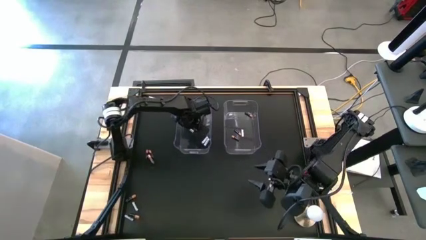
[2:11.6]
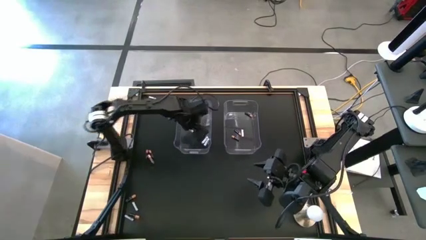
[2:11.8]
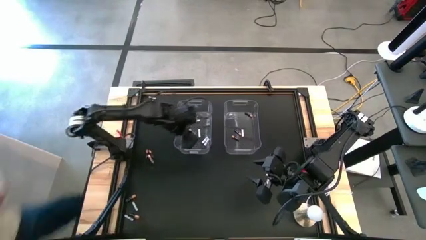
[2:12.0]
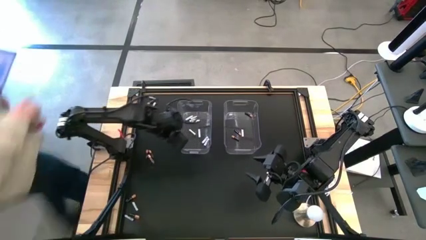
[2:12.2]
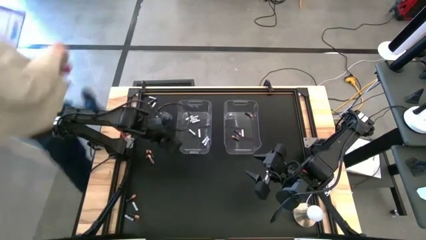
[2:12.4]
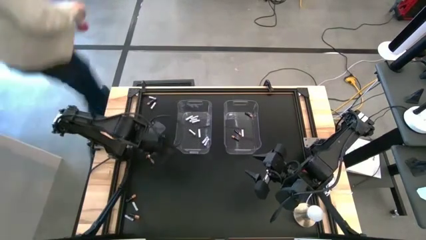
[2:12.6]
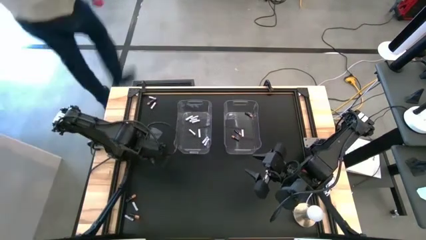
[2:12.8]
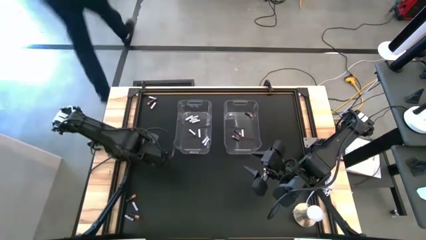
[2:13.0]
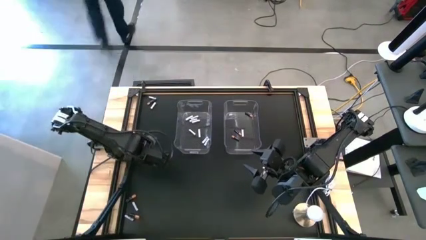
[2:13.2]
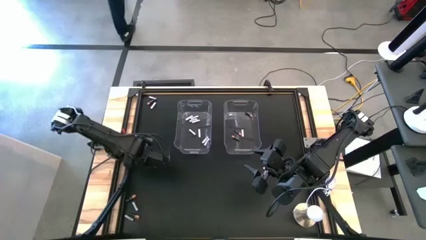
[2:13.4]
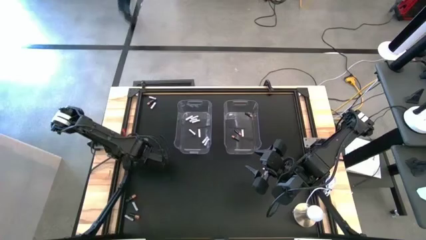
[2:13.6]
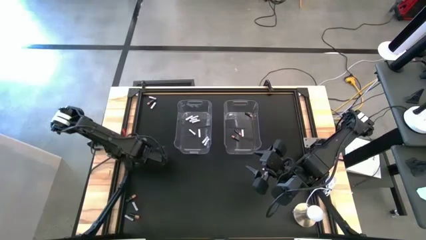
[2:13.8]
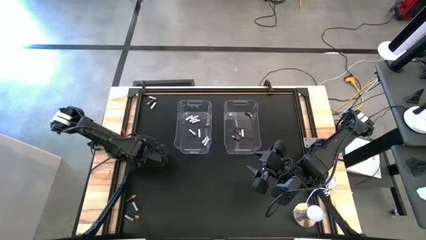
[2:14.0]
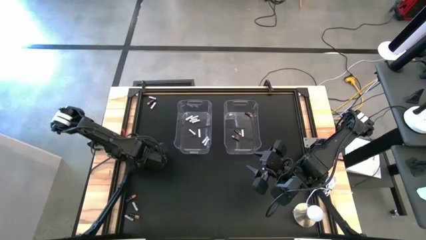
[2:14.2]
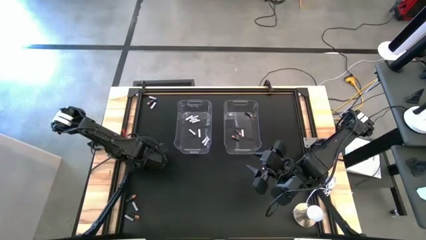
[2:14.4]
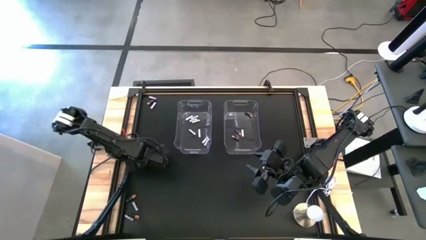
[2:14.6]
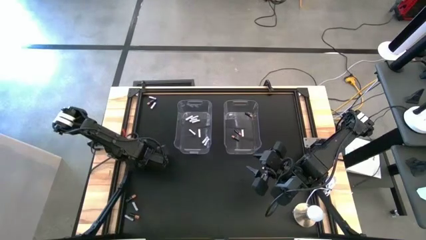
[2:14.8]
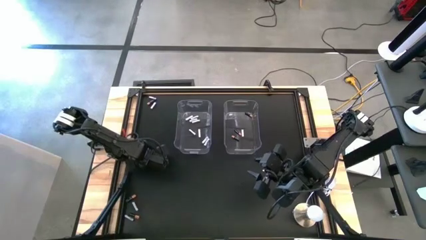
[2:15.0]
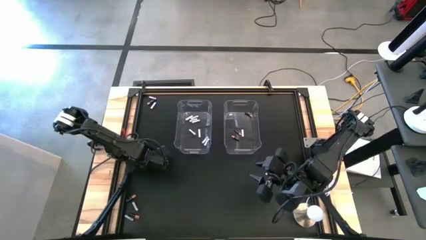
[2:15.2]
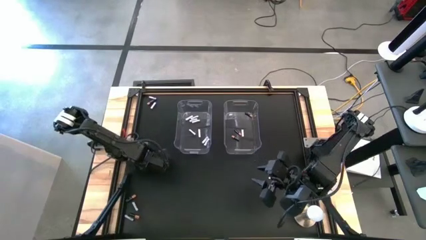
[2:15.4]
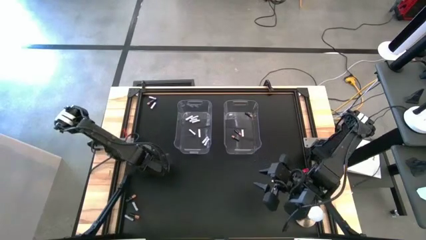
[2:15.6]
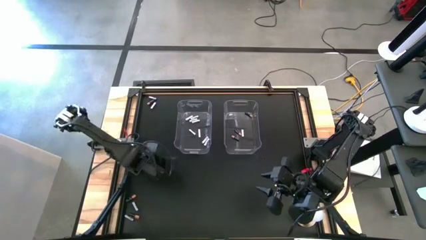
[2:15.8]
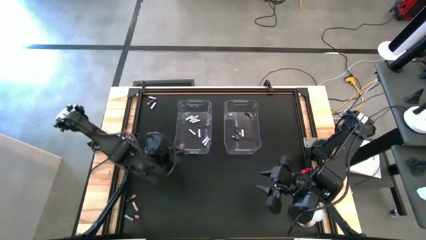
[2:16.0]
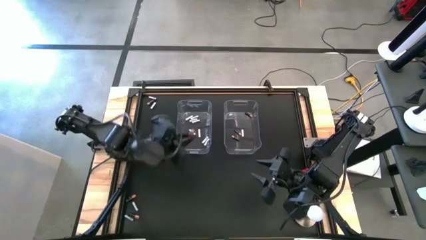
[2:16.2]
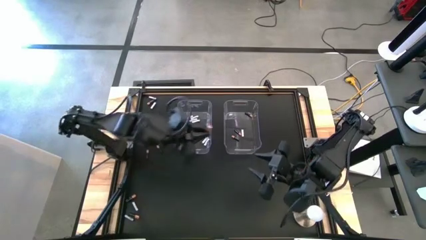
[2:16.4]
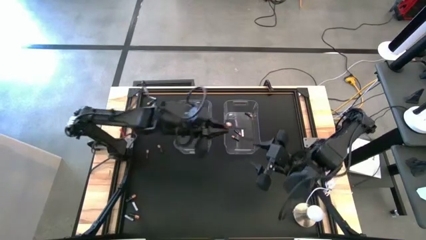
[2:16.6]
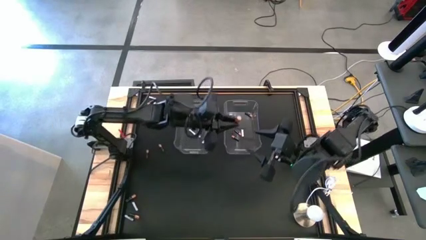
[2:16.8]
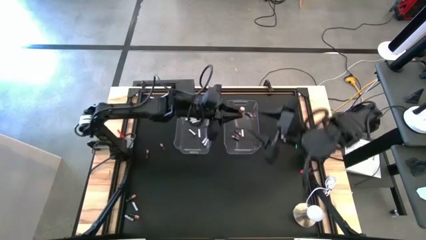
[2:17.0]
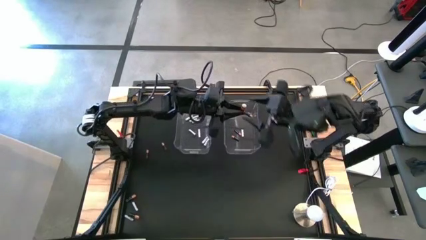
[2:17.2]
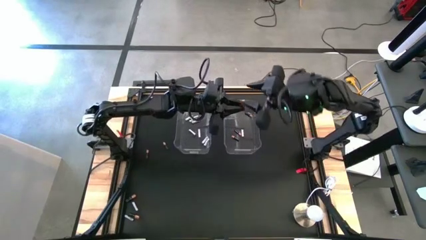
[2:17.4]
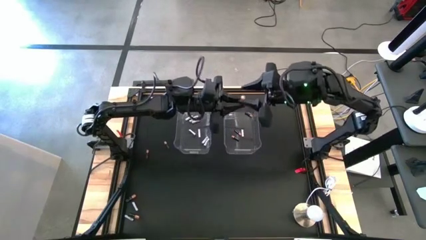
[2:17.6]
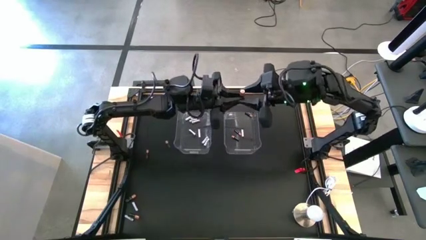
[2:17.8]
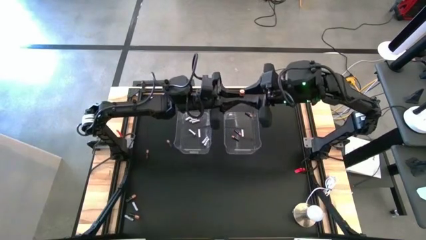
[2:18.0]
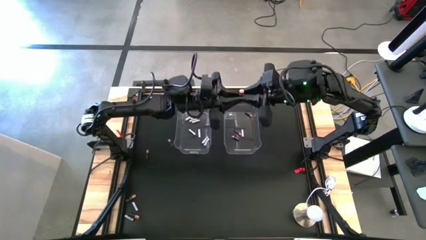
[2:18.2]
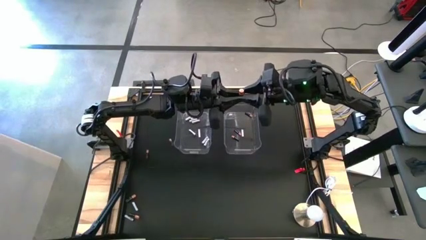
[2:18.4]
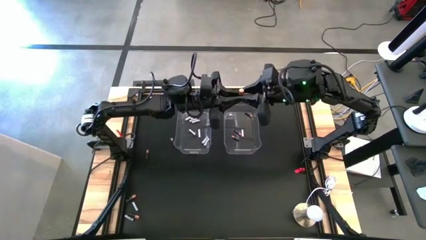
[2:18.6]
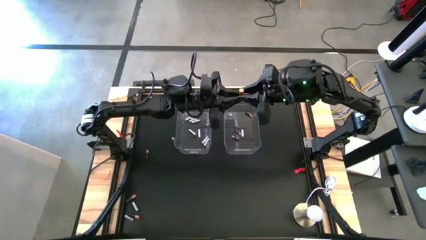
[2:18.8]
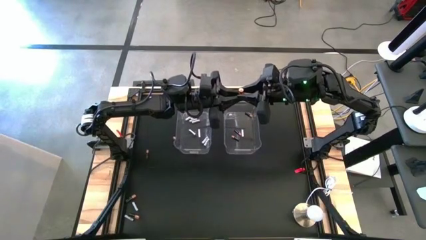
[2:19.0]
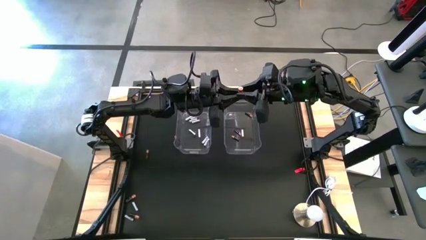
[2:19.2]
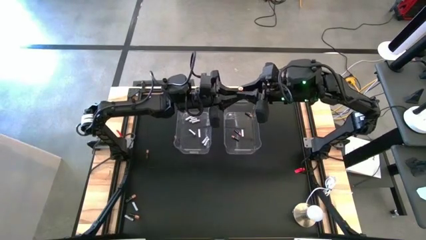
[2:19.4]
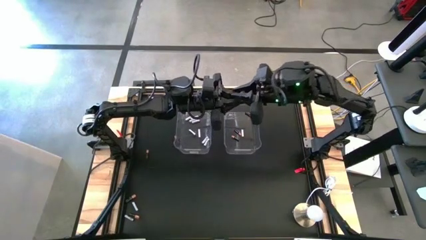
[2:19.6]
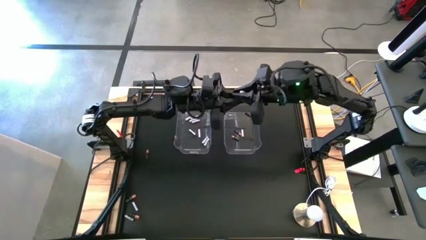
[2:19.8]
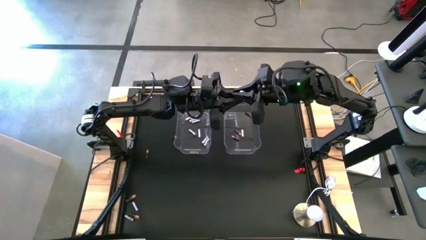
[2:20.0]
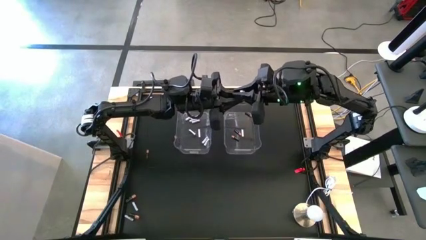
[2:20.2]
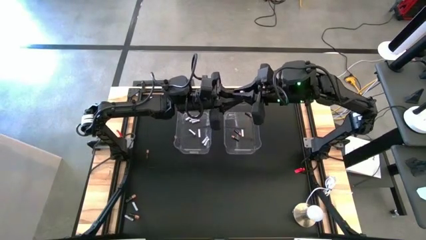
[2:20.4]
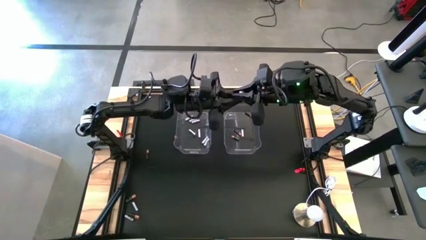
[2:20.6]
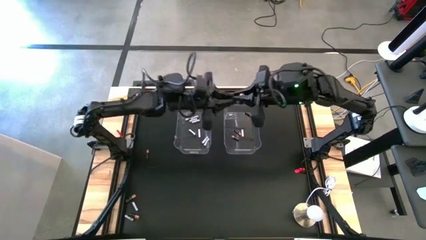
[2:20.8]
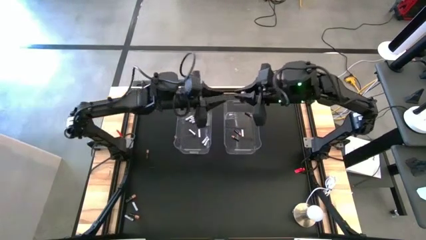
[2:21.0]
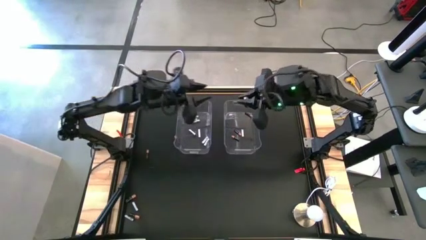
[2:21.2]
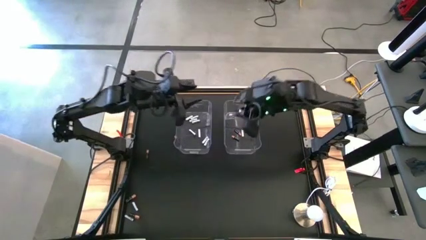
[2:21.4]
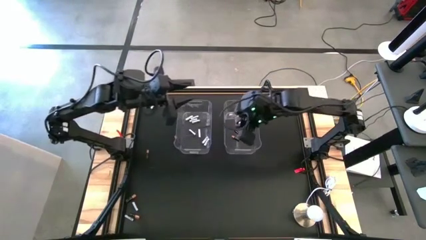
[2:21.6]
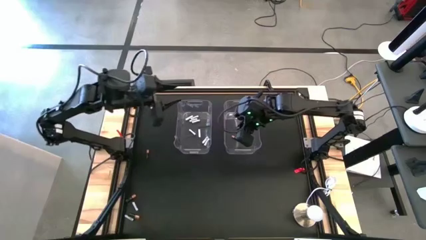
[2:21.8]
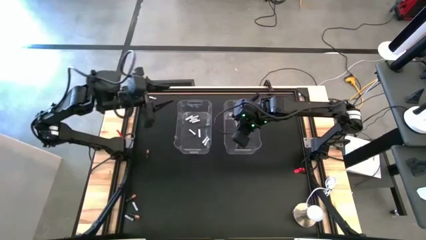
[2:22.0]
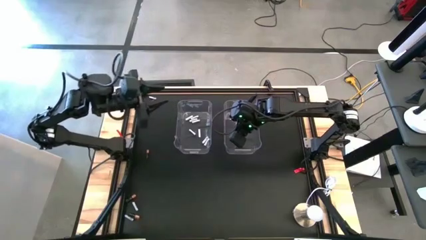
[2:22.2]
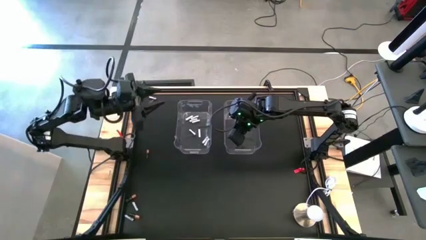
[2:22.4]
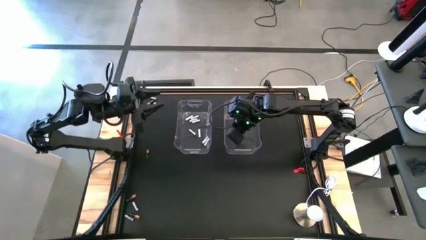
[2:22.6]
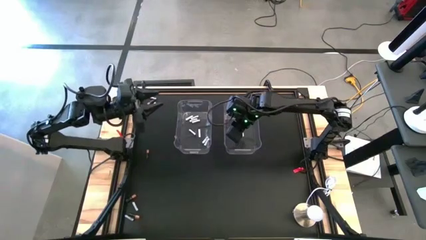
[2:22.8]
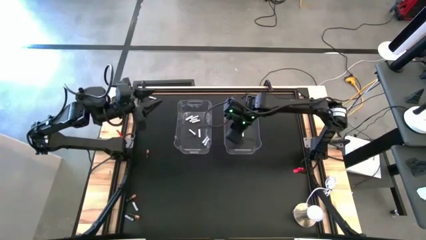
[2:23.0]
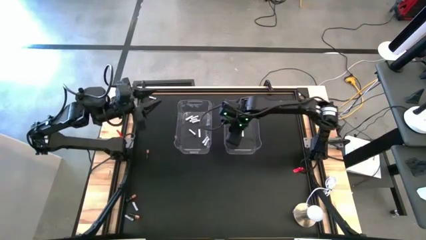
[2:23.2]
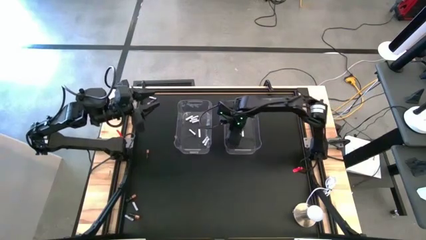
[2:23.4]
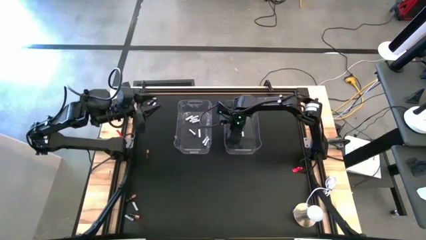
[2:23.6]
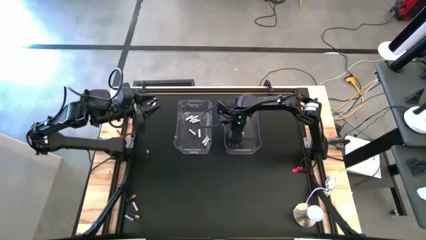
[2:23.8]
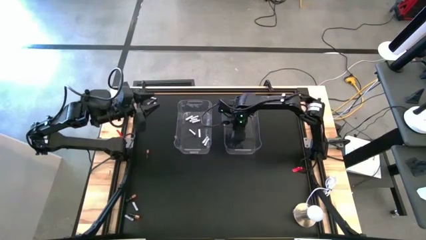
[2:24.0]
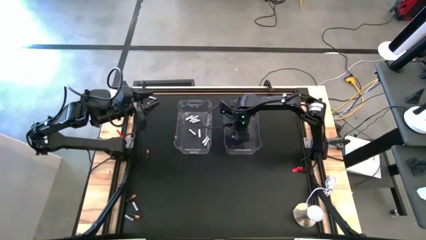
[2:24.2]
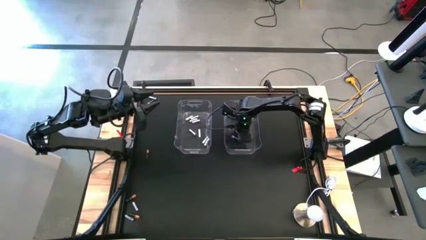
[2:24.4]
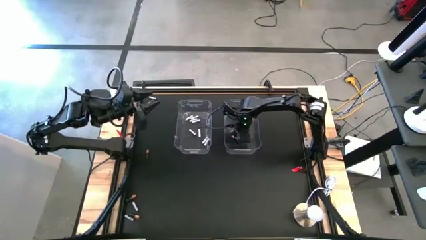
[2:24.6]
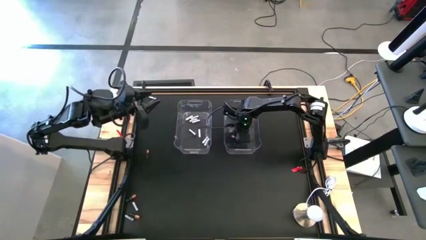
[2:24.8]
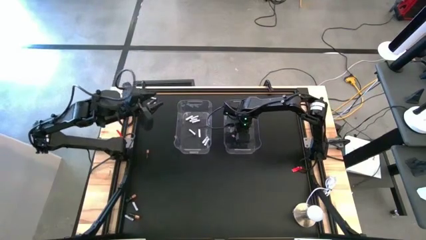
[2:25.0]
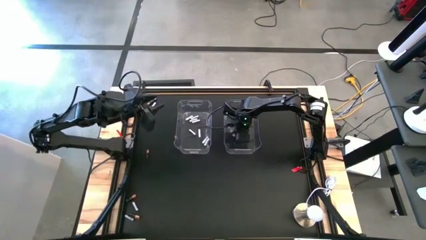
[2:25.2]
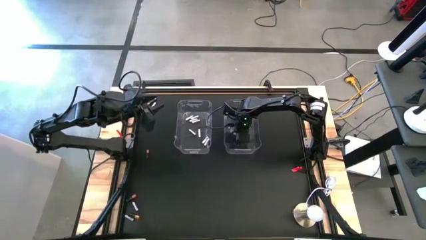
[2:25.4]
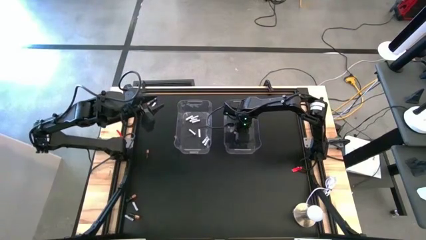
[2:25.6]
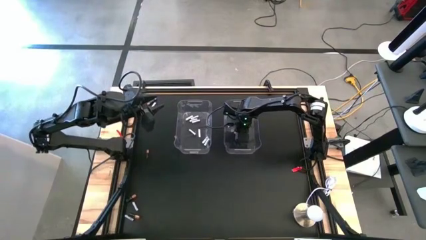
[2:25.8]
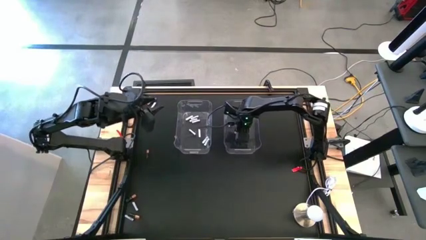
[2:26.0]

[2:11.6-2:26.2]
Task: Sort batteries
Put the black battery into the right transparent bin
